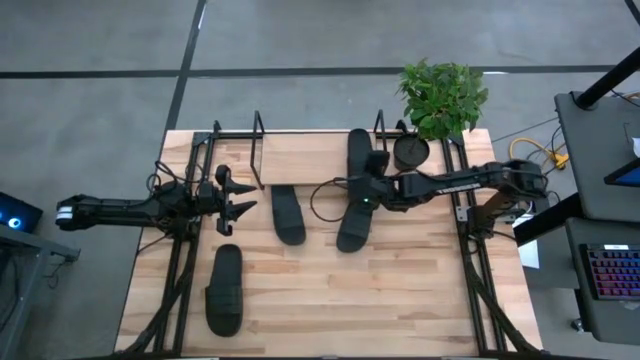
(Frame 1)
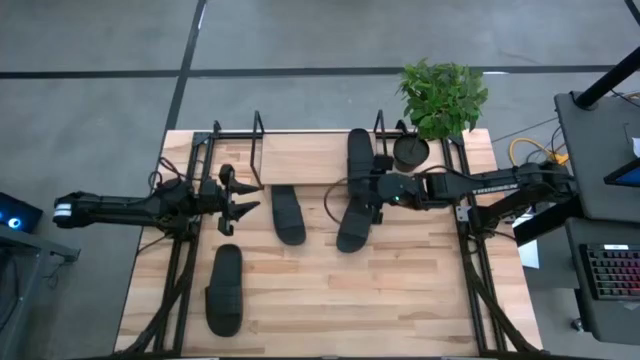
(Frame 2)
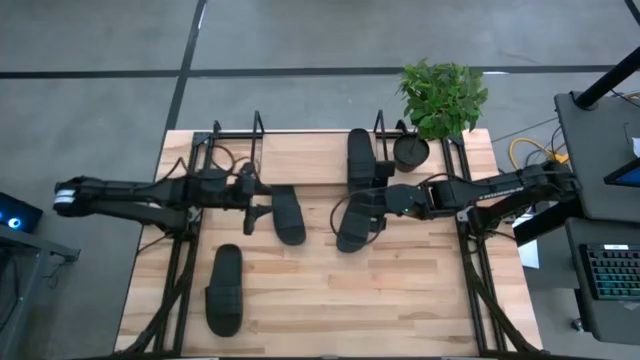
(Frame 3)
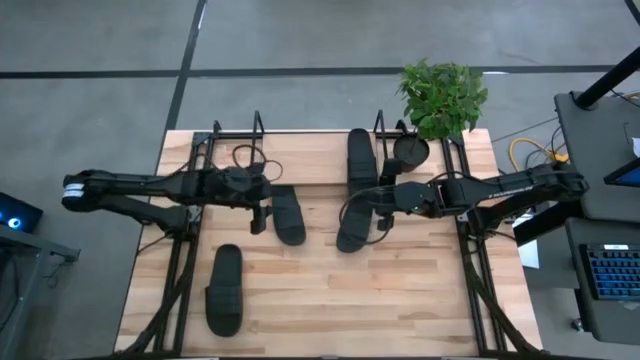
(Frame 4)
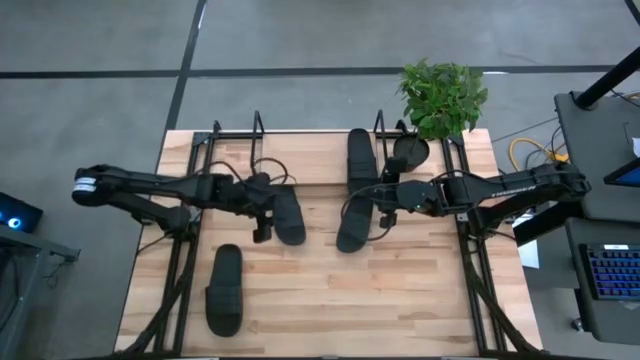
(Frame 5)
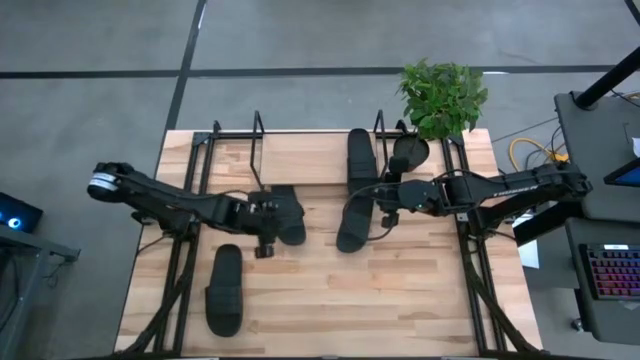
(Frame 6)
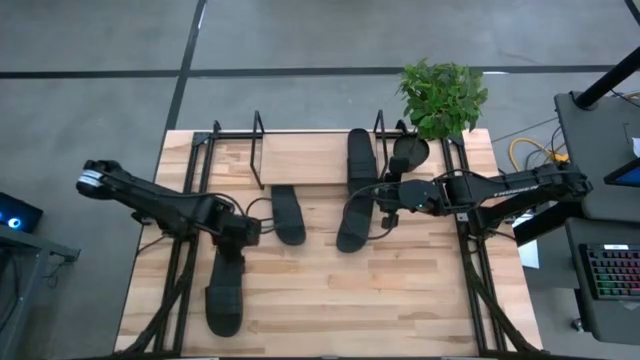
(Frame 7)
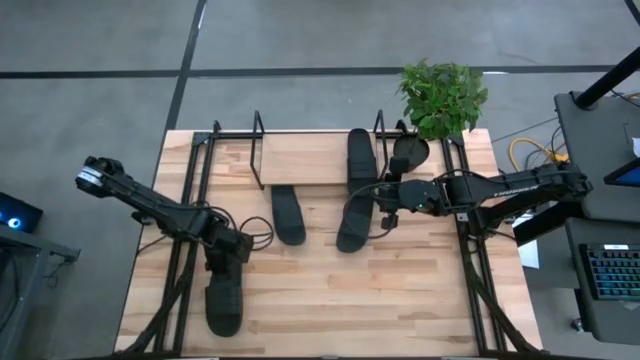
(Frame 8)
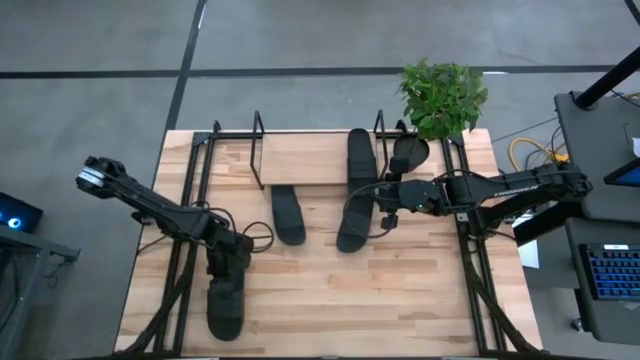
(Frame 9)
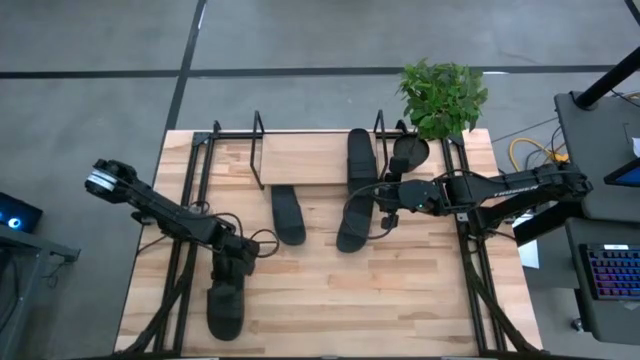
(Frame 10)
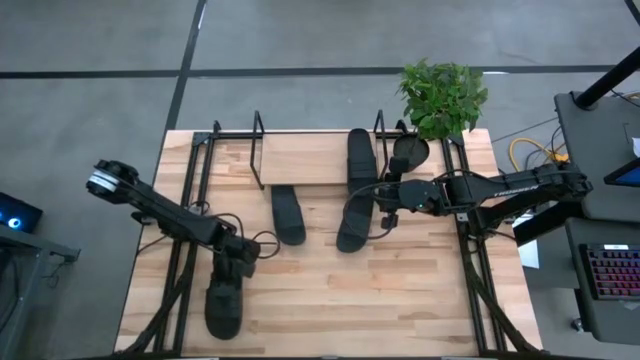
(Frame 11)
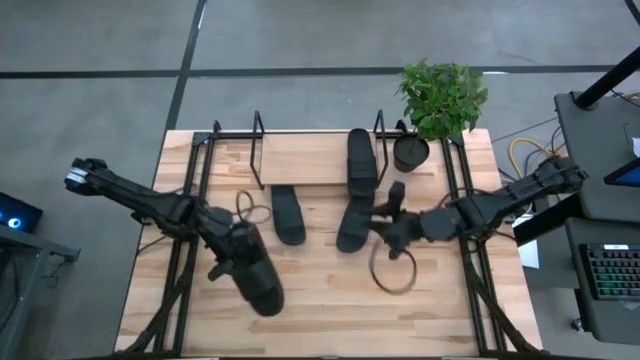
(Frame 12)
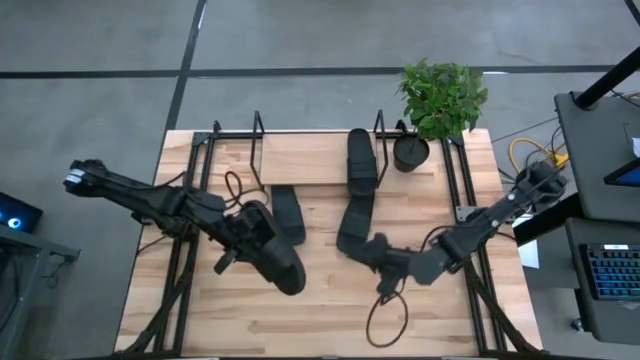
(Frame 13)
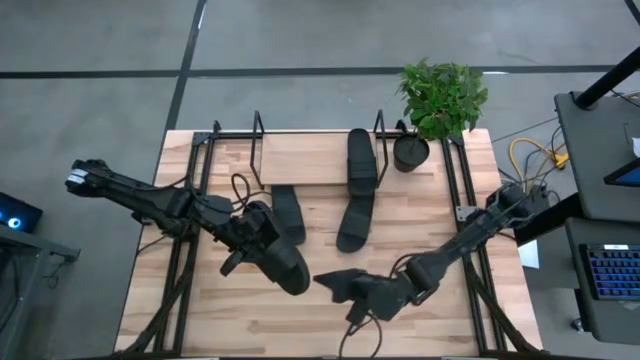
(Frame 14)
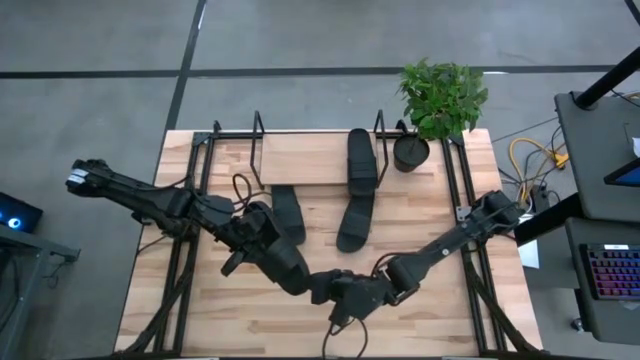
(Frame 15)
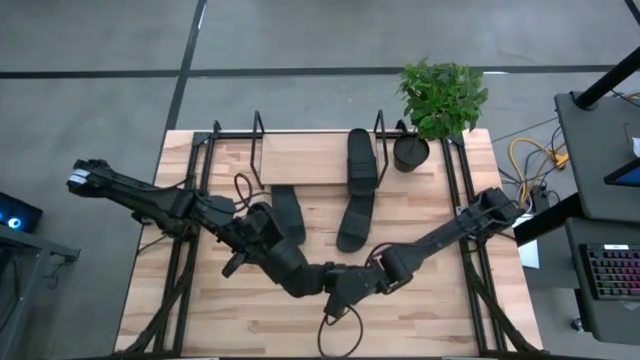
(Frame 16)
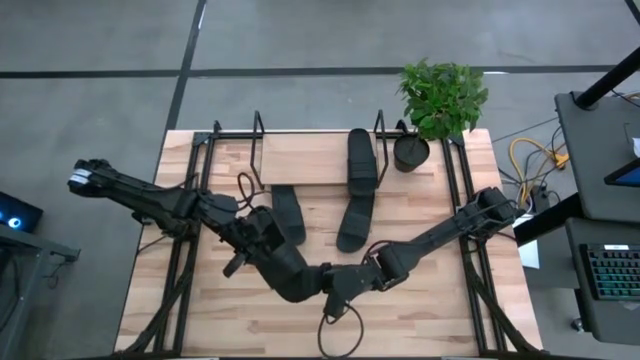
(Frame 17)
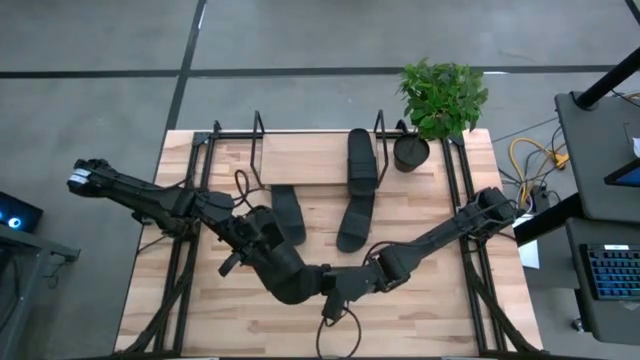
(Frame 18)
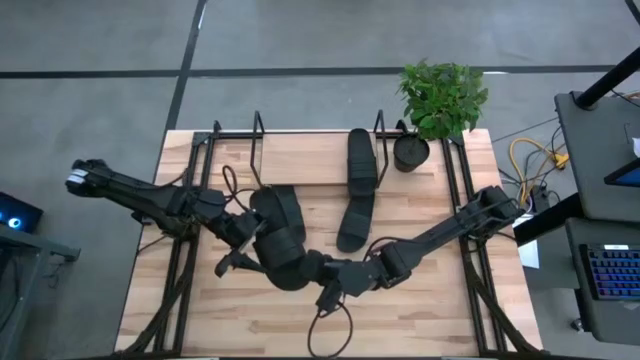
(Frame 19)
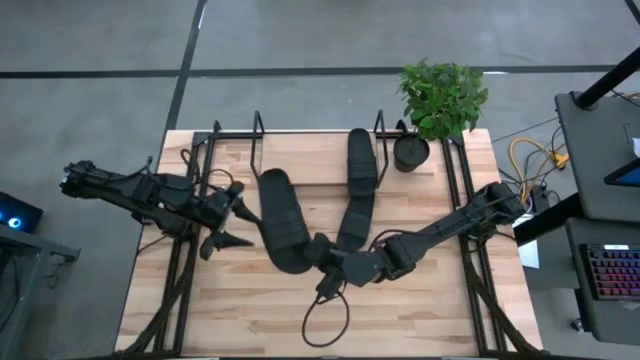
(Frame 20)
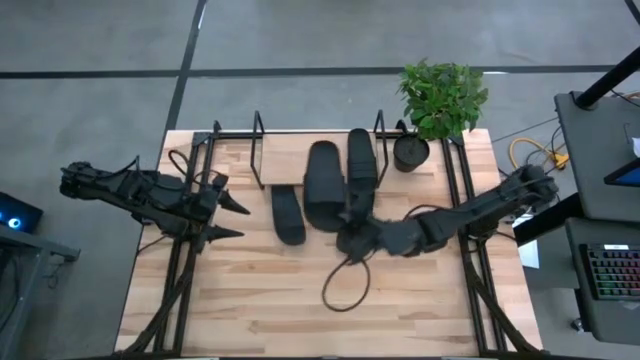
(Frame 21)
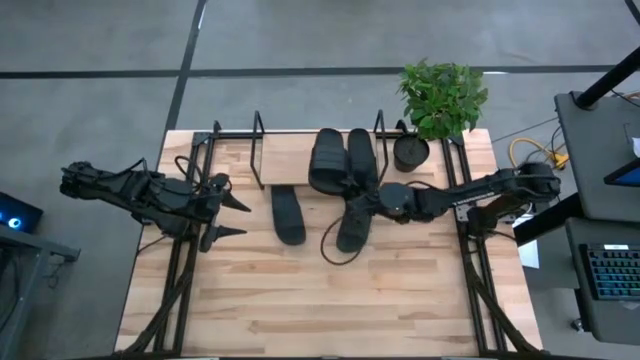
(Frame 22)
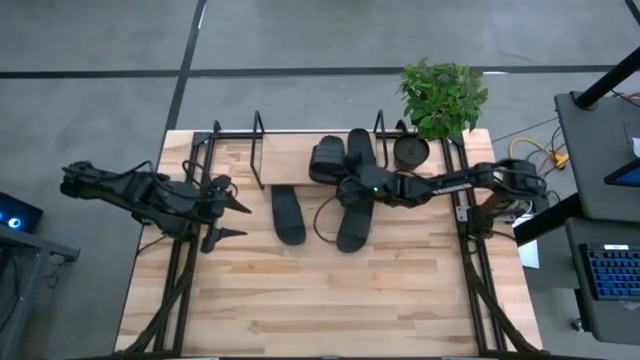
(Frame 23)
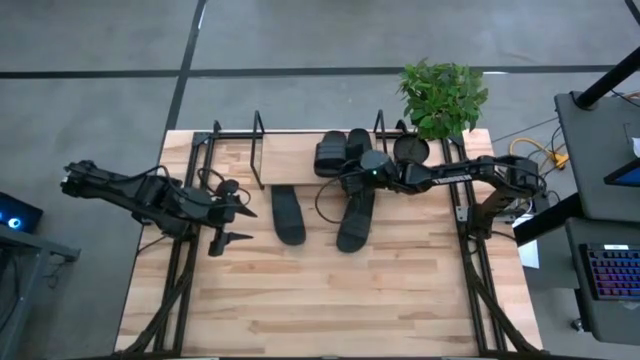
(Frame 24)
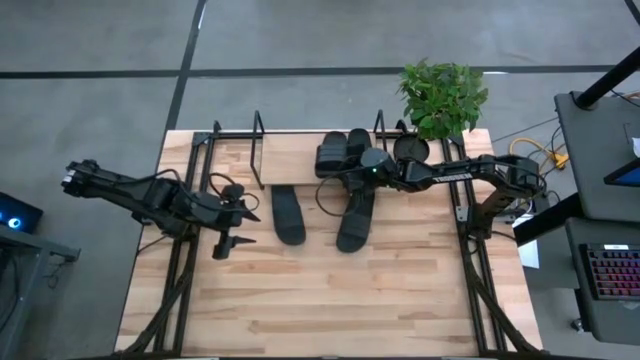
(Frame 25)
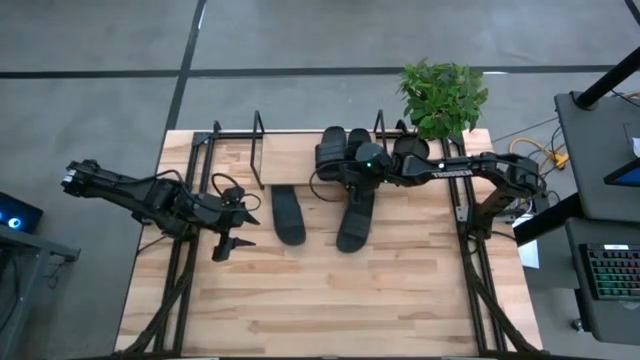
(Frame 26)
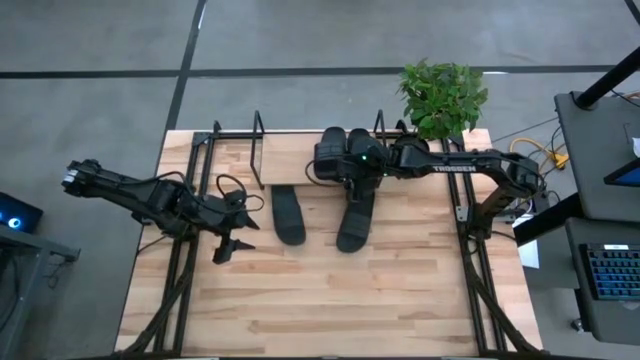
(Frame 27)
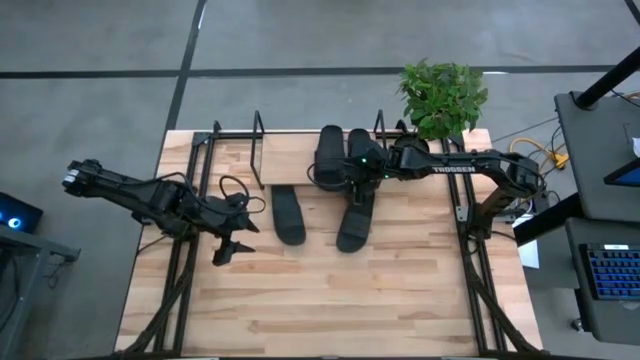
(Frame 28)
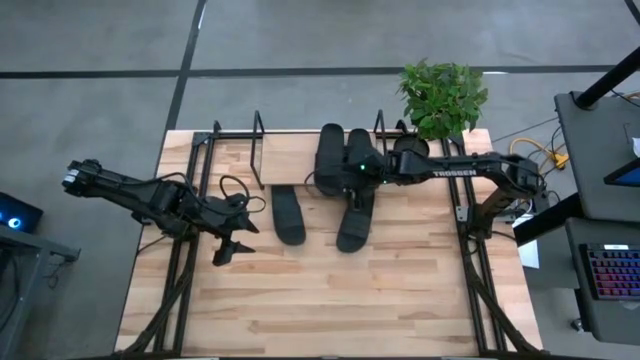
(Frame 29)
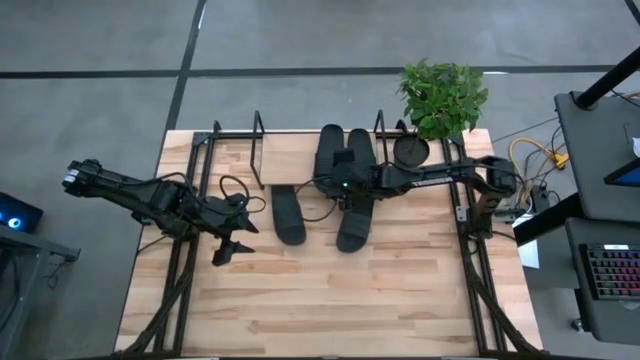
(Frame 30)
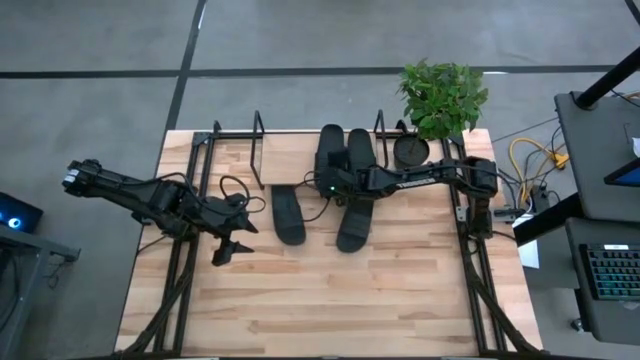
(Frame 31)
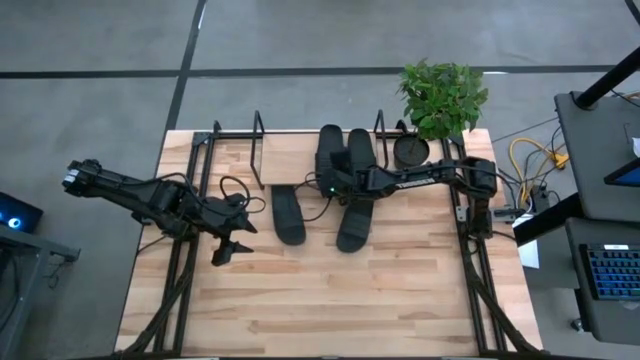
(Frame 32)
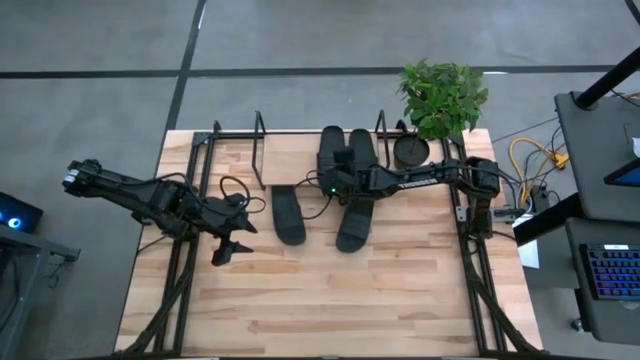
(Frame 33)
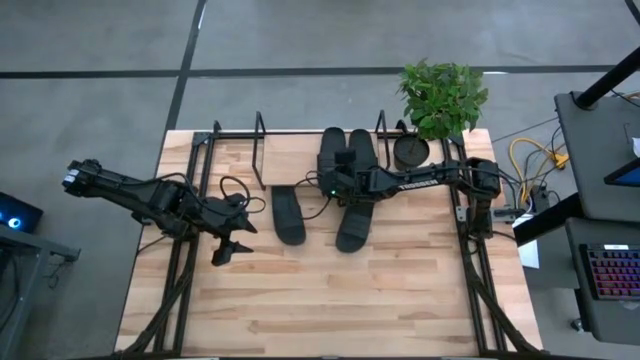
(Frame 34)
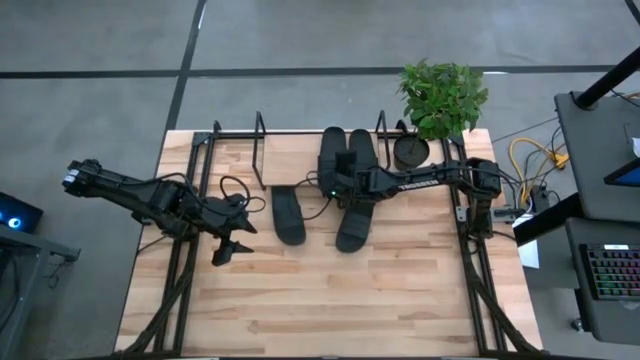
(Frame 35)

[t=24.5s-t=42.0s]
Task: Pick and place slides into the shelf
Put the bottom left black slides on the shelf
